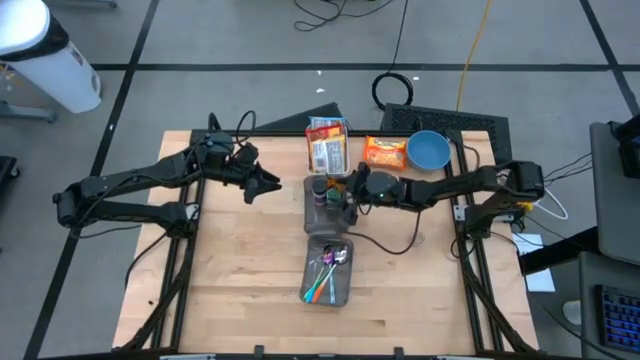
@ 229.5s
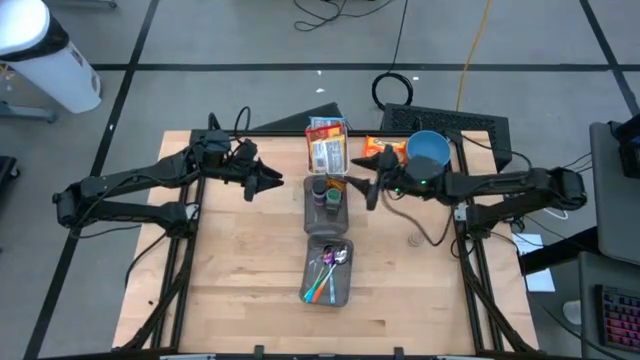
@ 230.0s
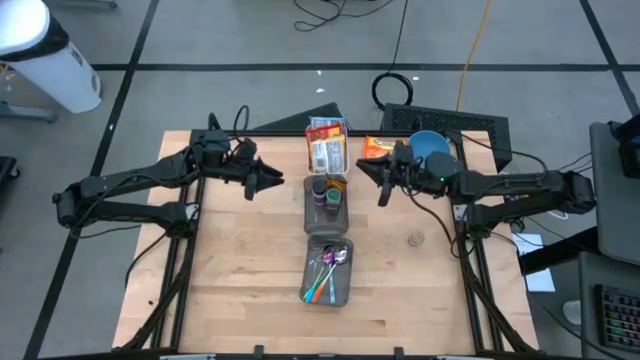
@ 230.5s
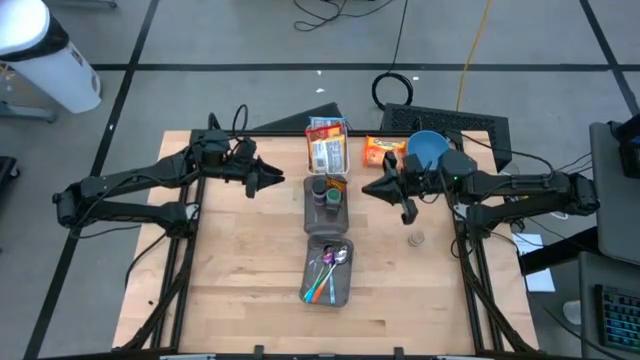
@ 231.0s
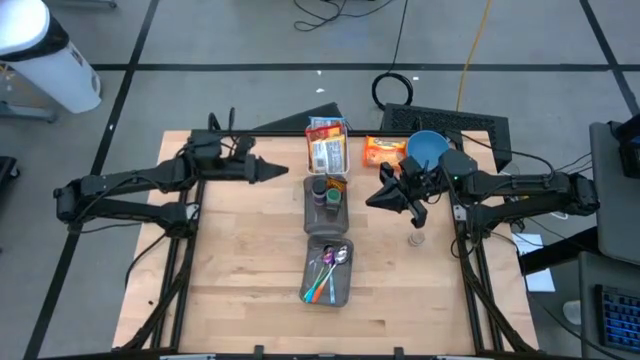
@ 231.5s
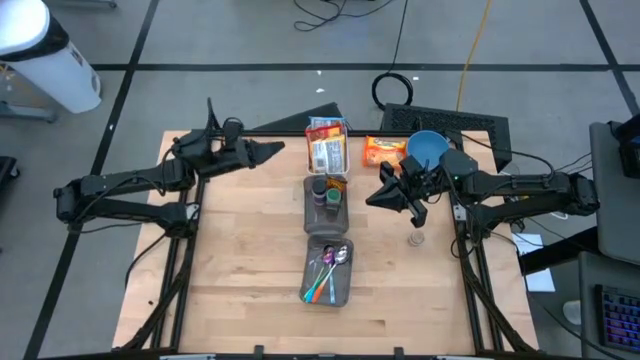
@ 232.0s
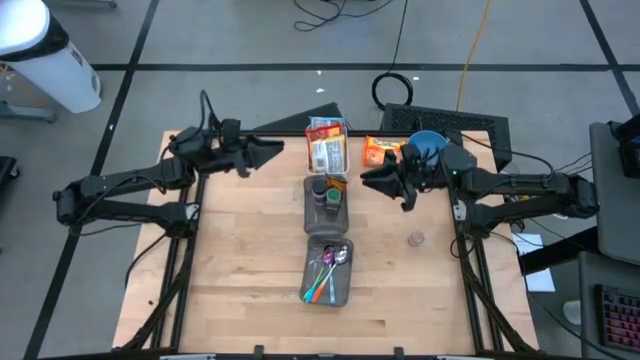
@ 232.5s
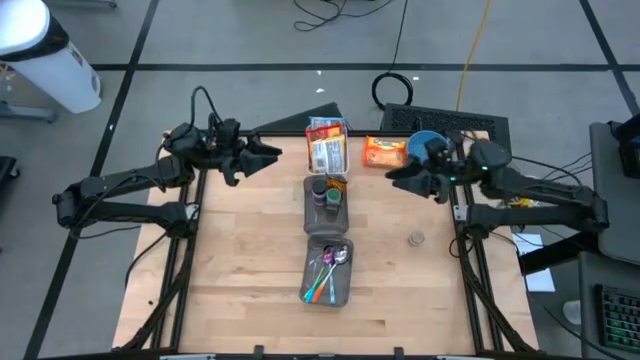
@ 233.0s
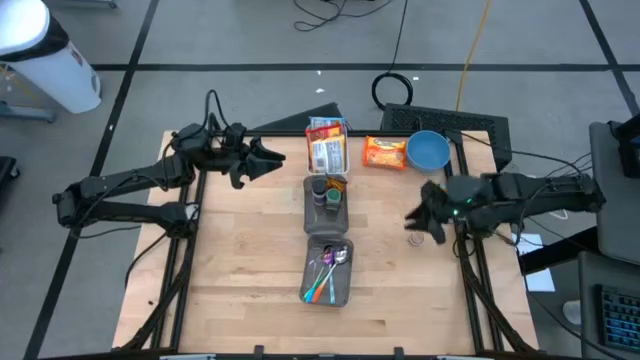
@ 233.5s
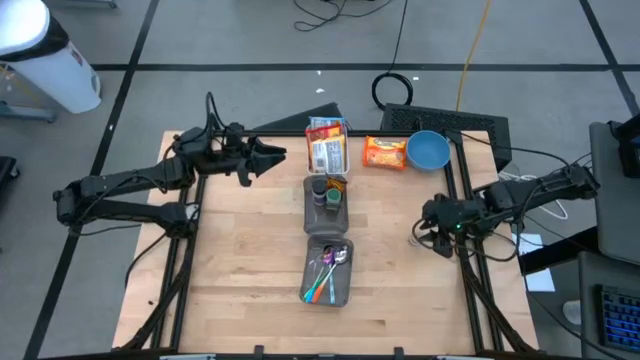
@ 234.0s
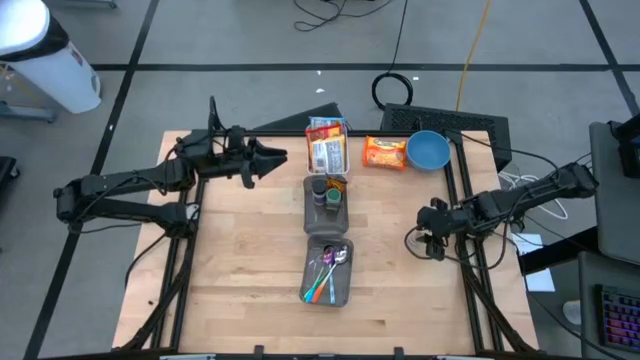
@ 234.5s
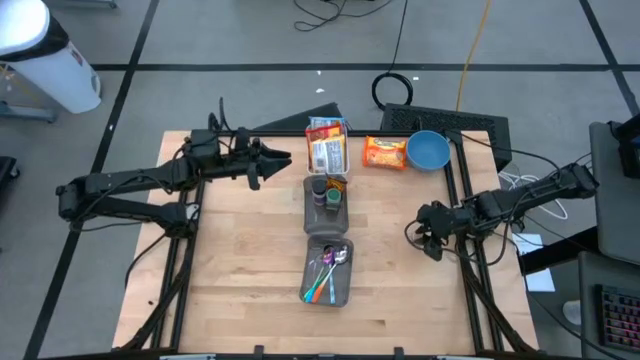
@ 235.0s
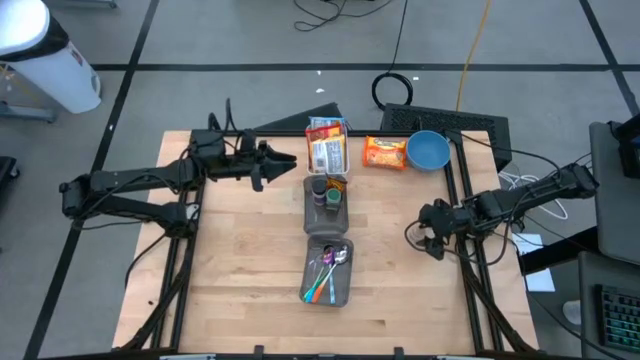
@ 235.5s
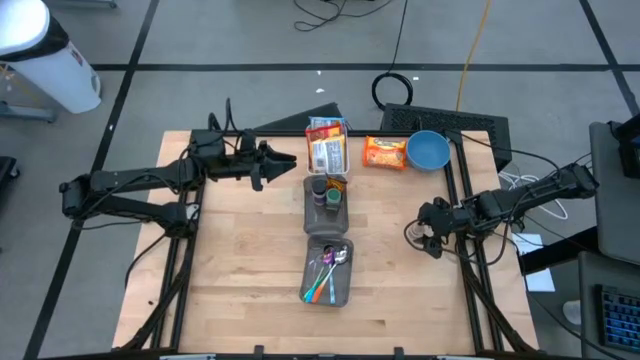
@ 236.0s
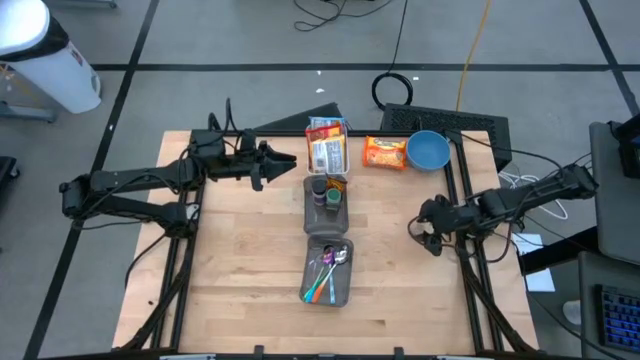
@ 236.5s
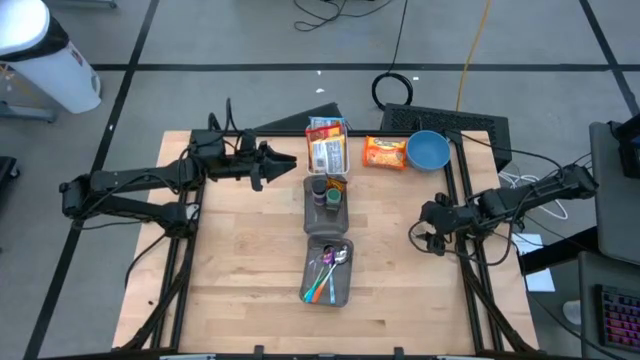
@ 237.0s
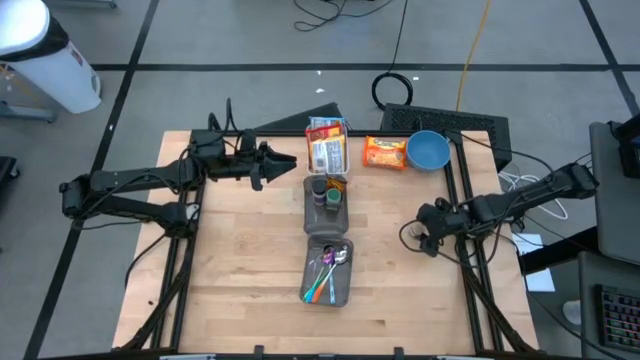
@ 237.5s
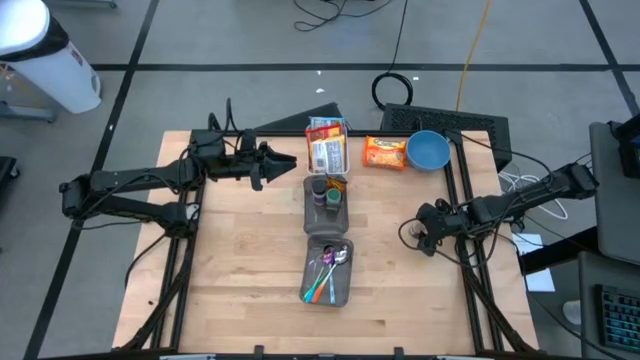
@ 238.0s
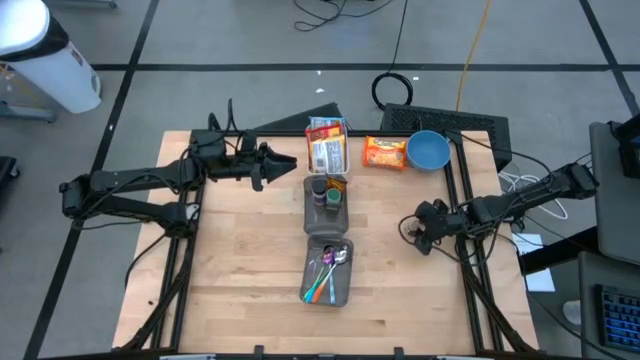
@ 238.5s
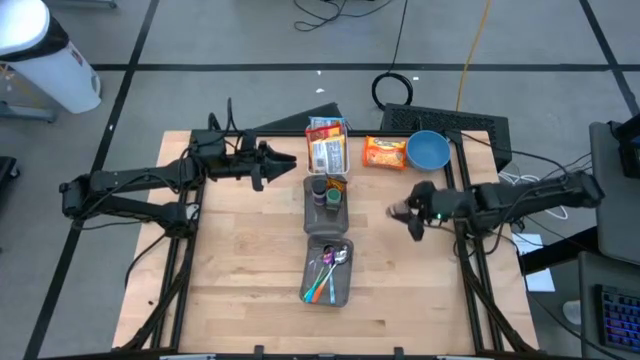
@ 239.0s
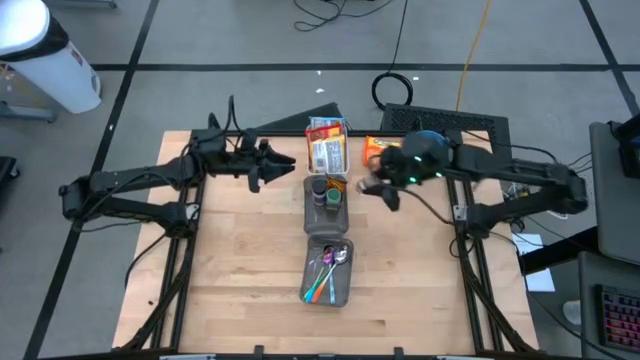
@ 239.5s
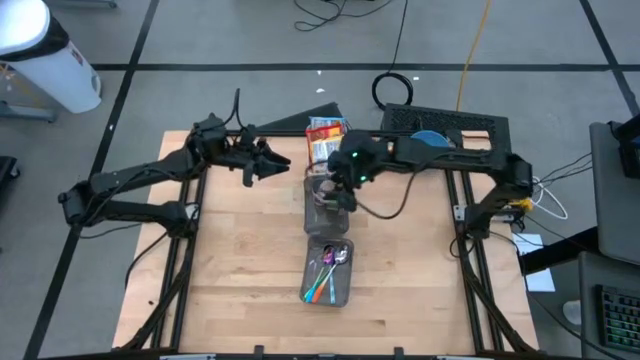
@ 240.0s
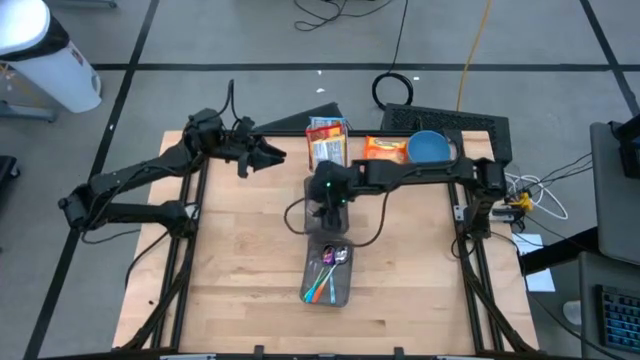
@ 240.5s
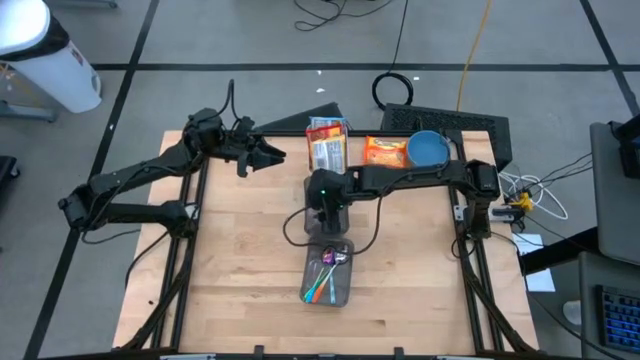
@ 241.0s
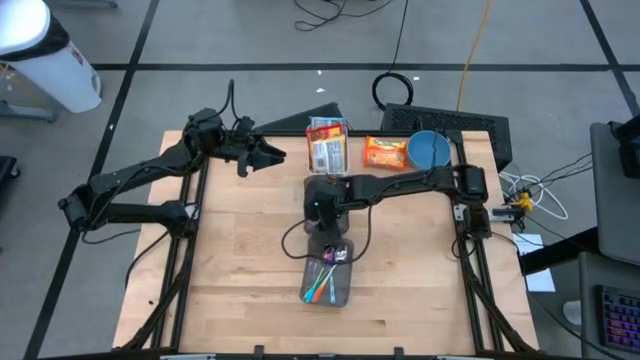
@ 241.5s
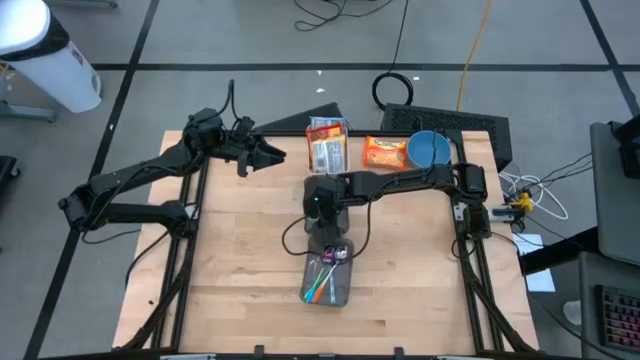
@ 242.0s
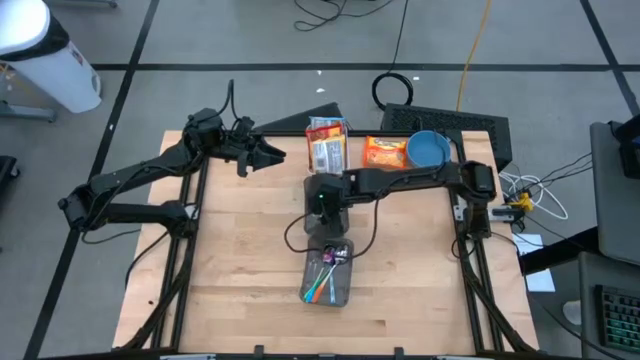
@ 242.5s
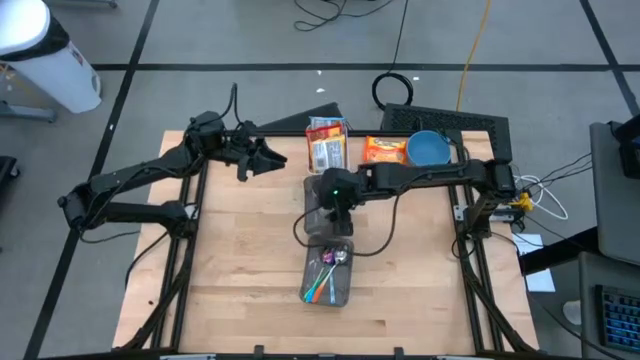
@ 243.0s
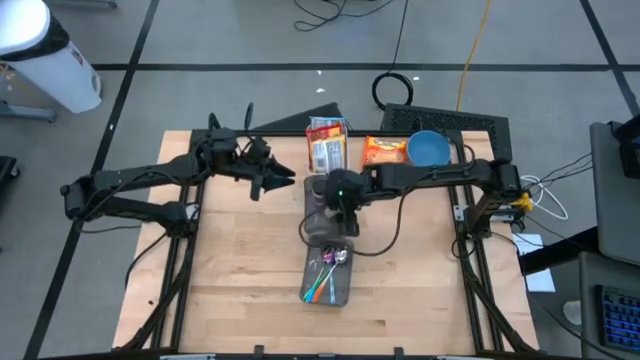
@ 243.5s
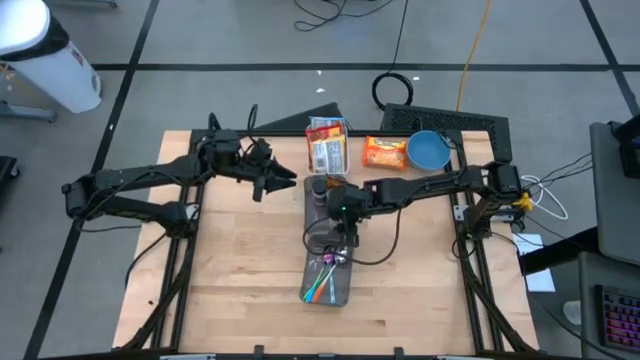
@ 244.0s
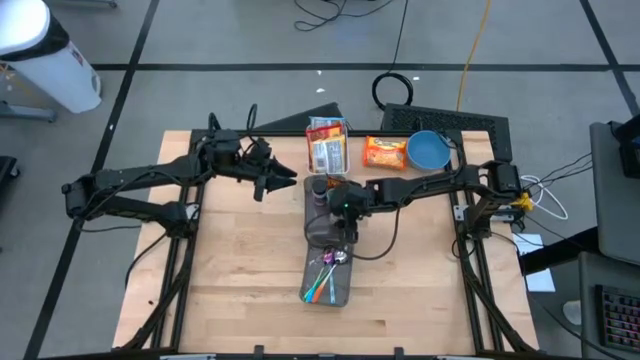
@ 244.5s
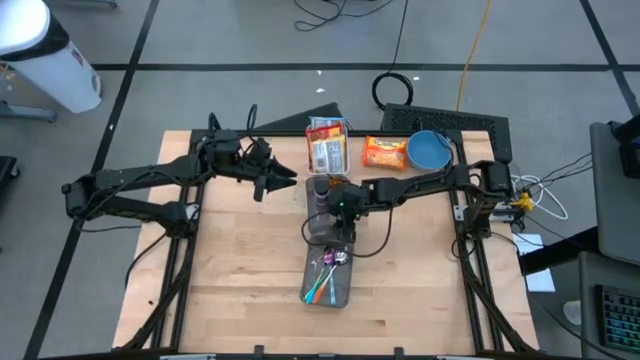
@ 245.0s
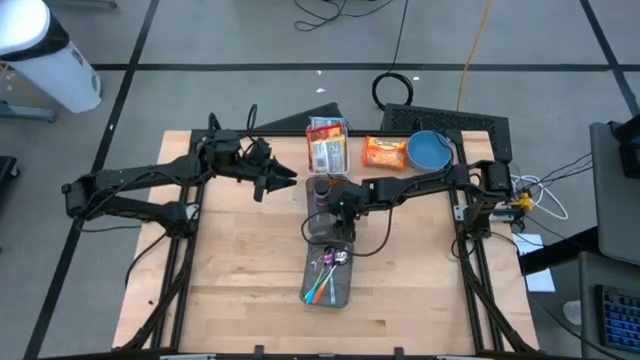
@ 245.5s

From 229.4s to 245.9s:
Task: Pick & Place Food Item
Put the brown seasoning bottle into the top black bin

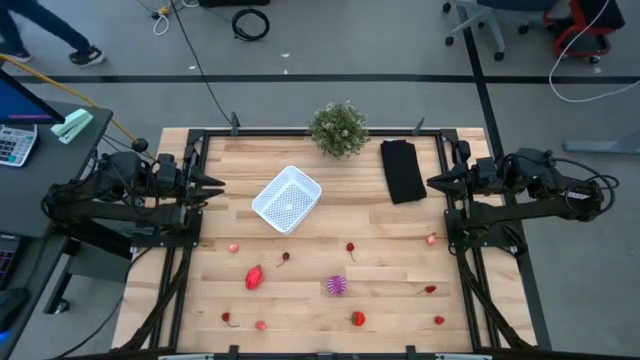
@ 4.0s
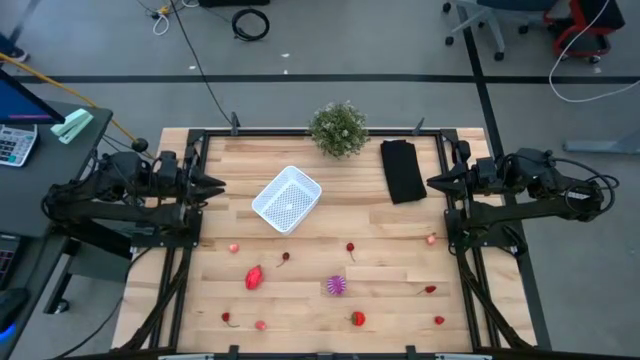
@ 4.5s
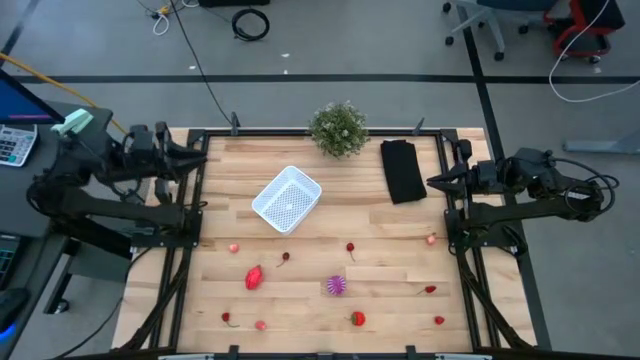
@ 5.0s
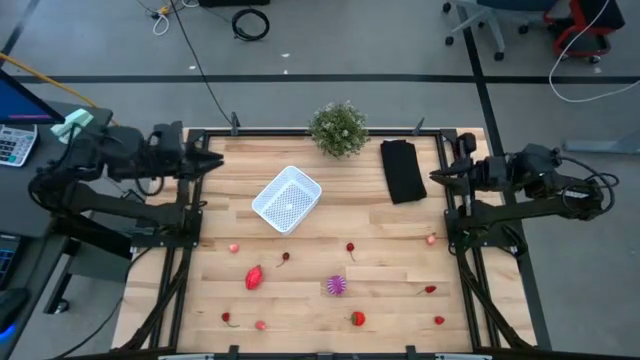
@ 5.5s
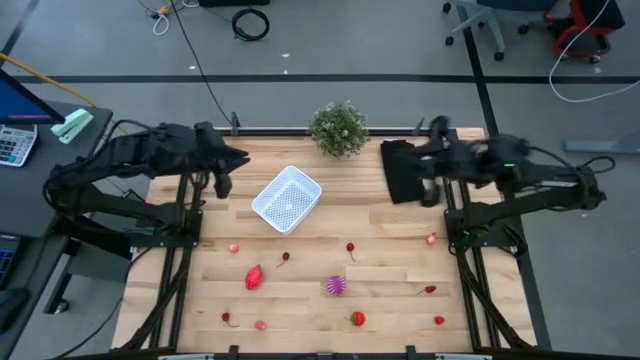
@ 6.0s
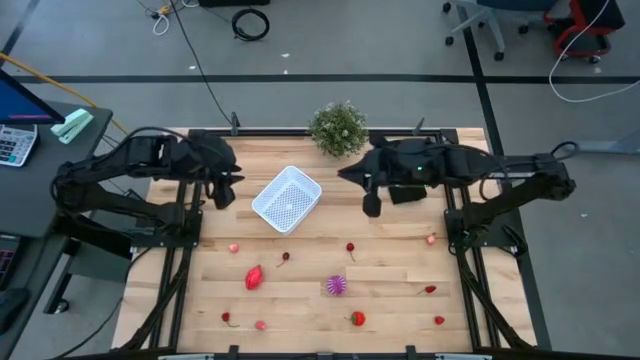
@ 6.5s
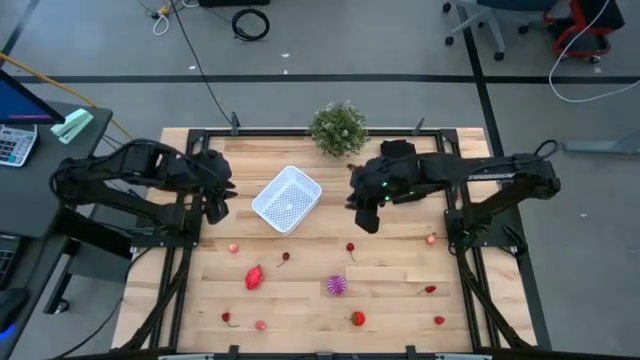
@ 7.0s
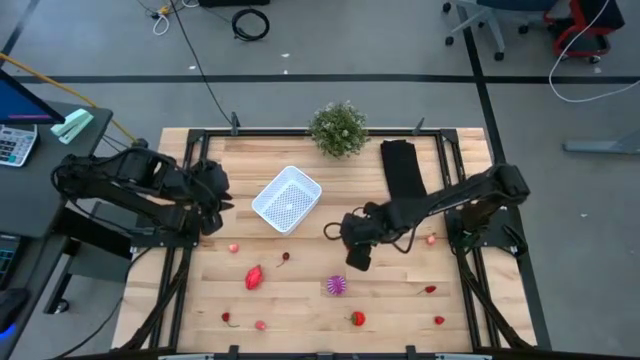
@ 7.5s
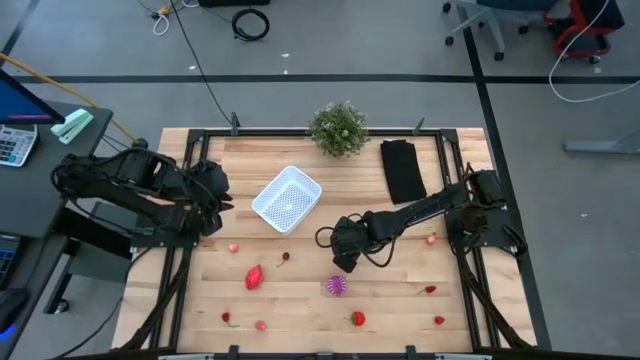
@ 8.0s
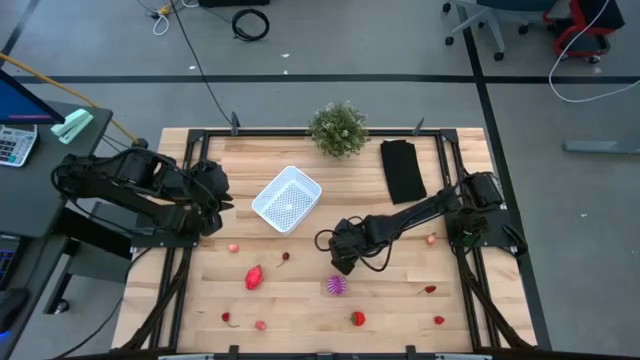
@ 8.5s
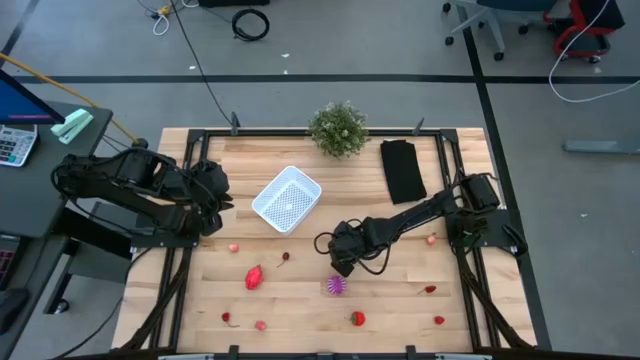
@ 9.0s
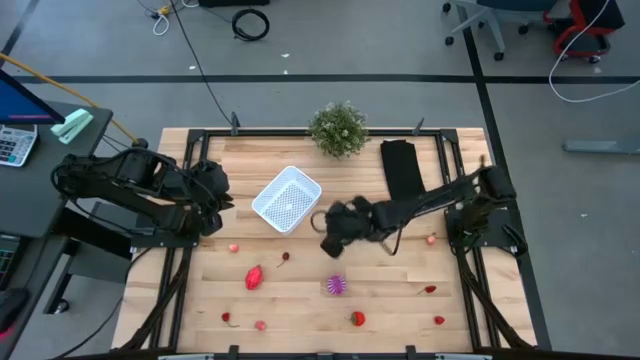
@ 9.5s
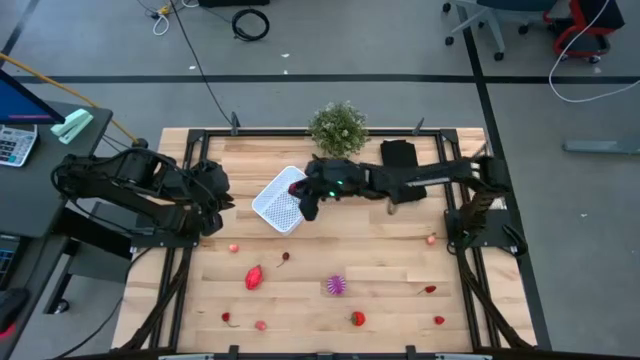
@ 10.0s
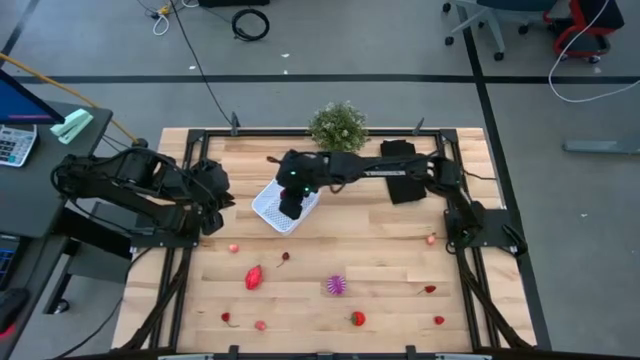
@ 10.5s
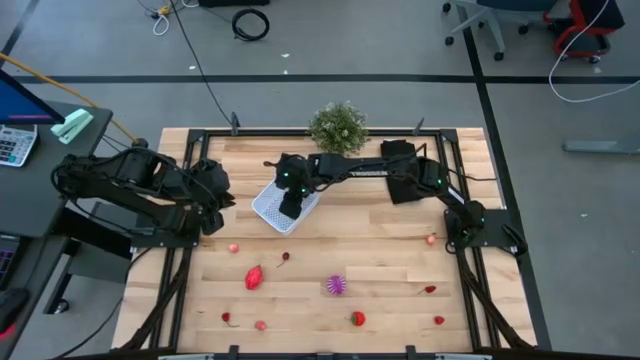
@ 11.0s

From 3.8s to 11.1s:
Task: Pick and placing Produce into tupperware
Put the red cherry into the white basket
